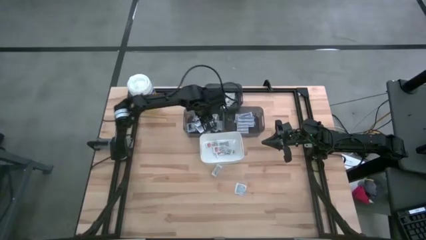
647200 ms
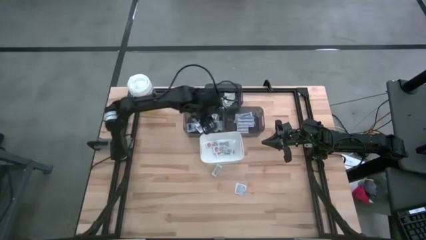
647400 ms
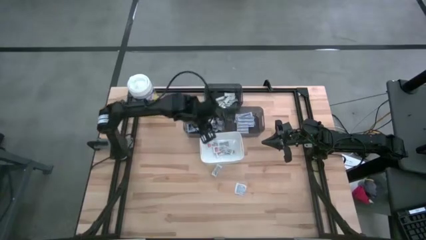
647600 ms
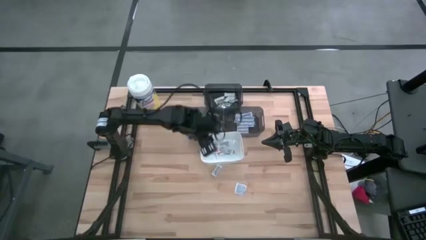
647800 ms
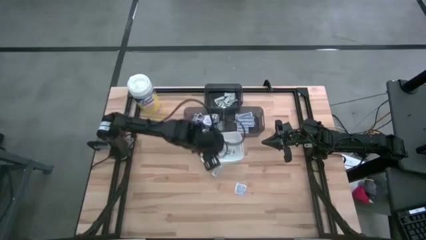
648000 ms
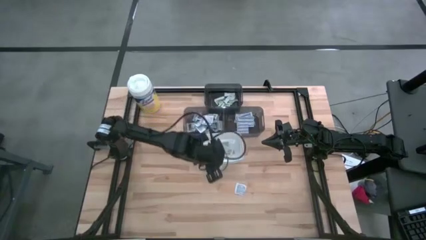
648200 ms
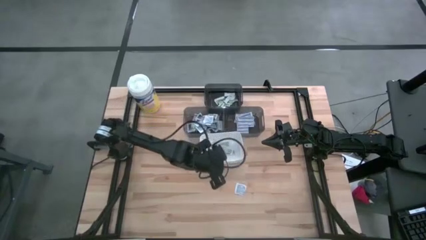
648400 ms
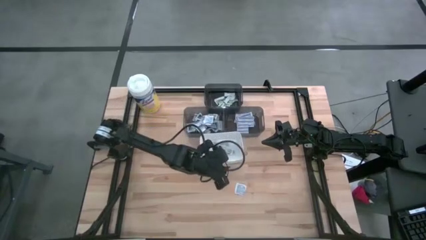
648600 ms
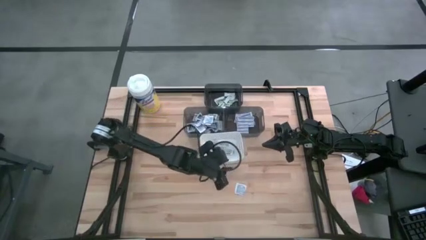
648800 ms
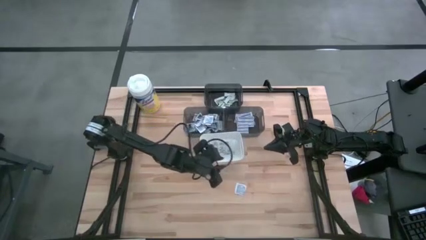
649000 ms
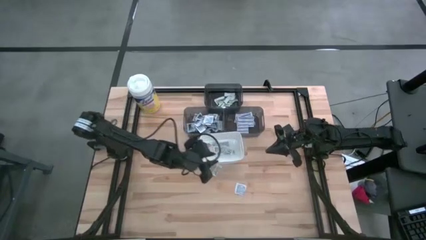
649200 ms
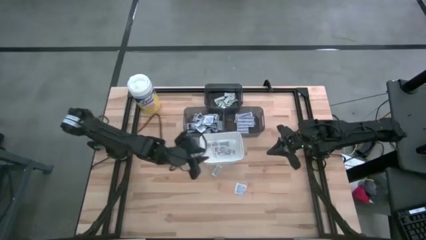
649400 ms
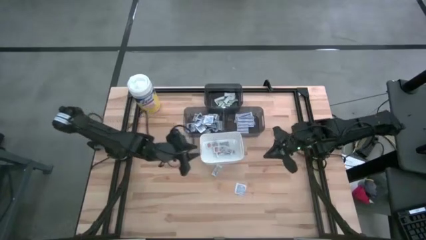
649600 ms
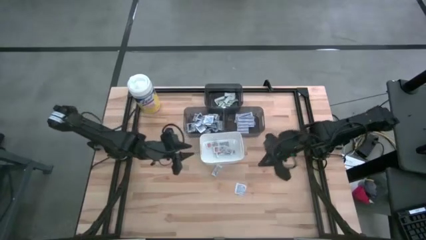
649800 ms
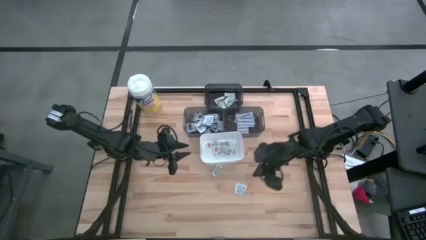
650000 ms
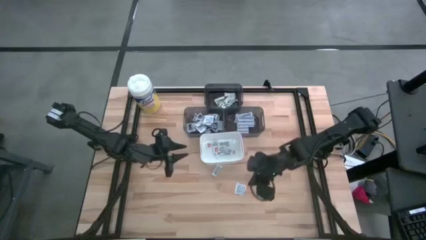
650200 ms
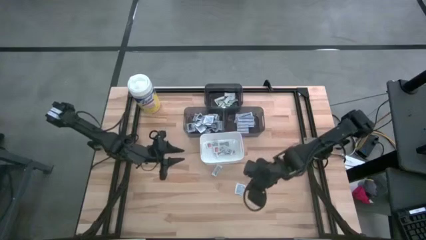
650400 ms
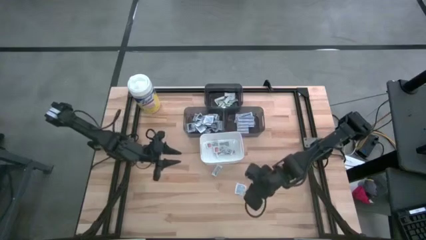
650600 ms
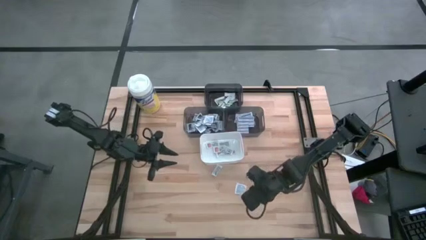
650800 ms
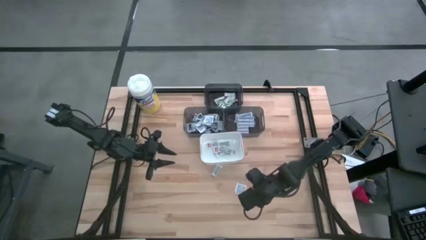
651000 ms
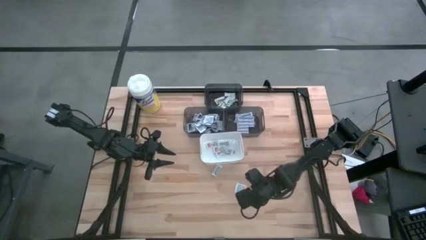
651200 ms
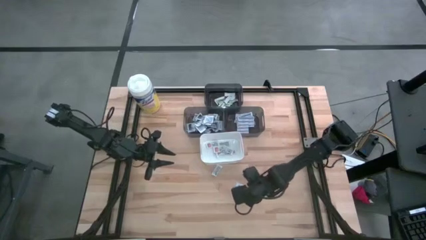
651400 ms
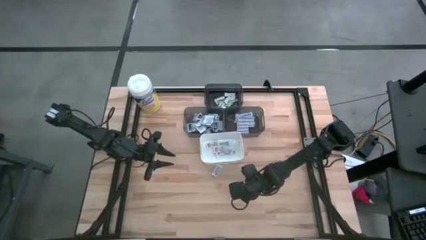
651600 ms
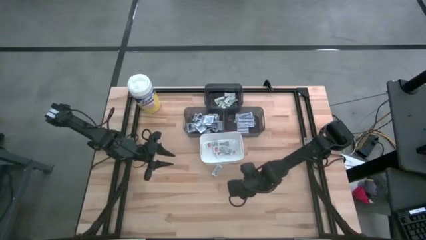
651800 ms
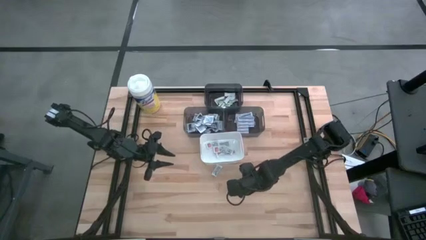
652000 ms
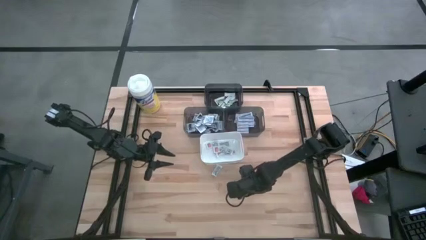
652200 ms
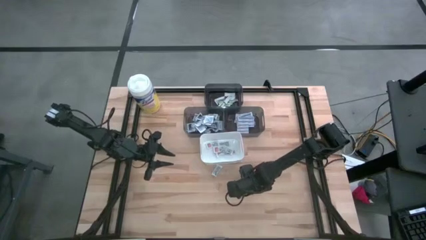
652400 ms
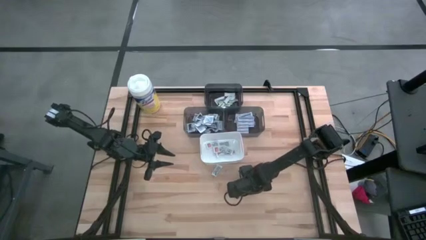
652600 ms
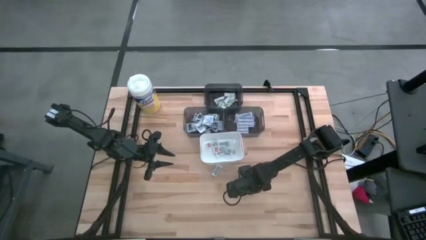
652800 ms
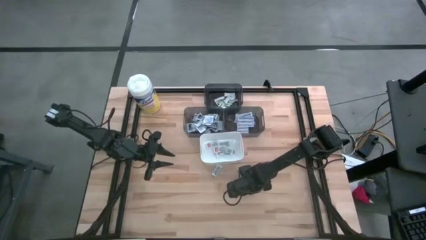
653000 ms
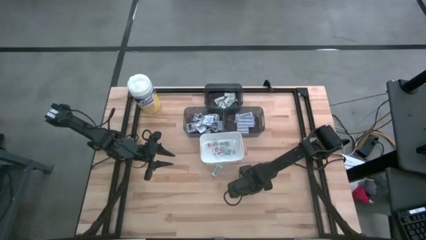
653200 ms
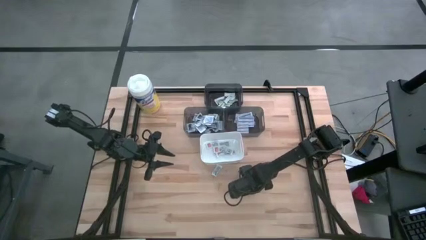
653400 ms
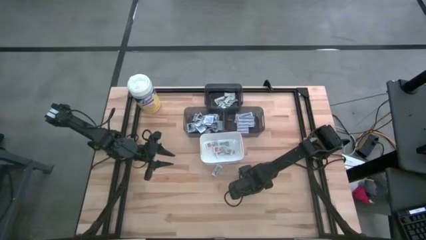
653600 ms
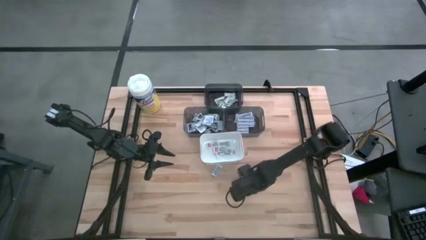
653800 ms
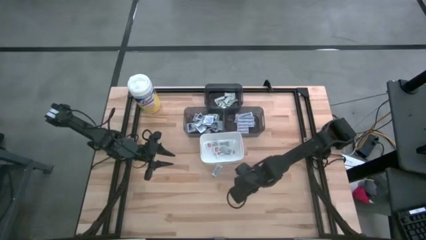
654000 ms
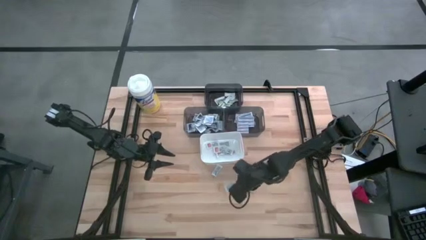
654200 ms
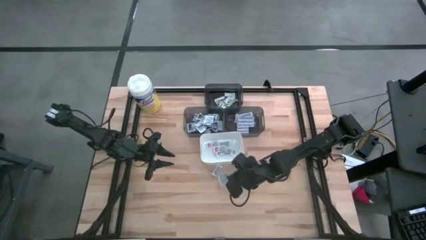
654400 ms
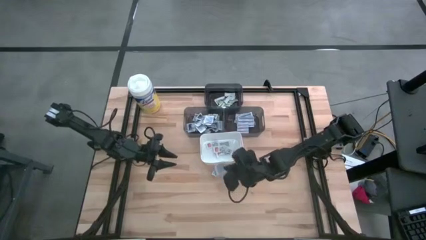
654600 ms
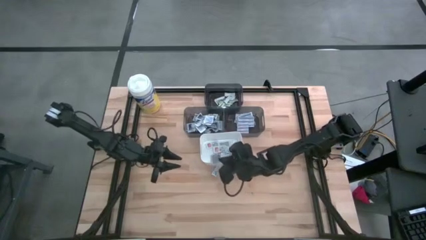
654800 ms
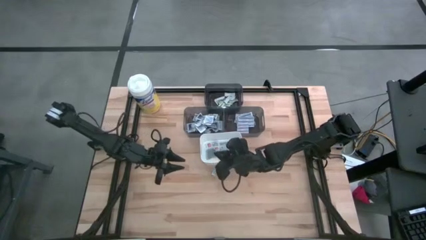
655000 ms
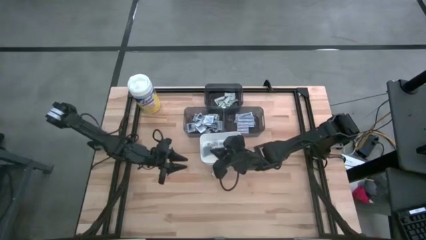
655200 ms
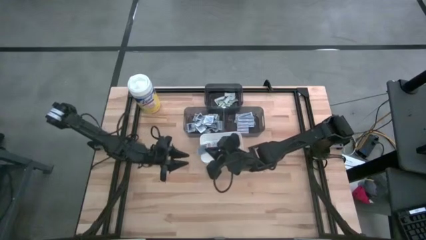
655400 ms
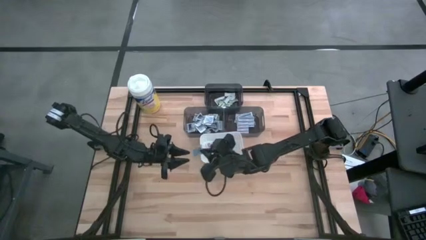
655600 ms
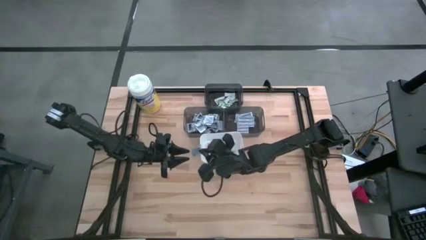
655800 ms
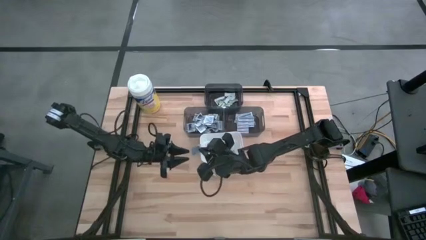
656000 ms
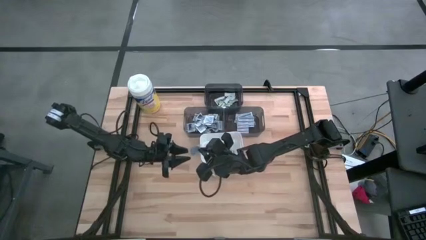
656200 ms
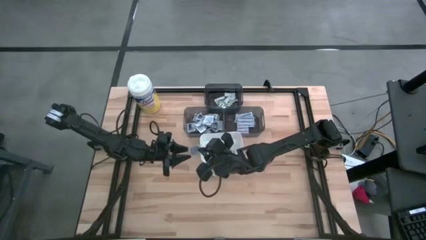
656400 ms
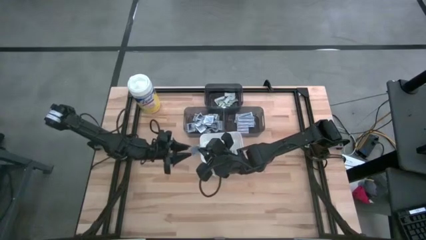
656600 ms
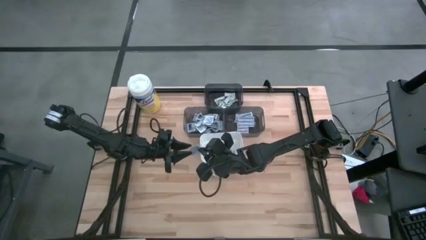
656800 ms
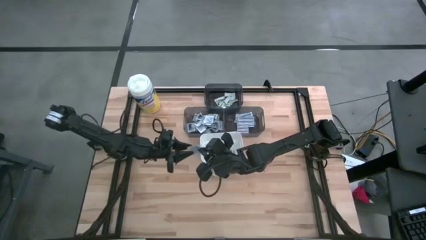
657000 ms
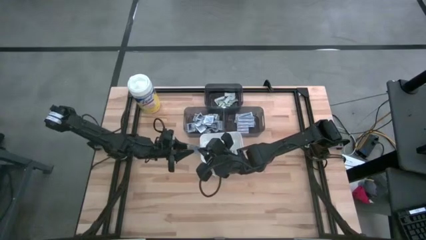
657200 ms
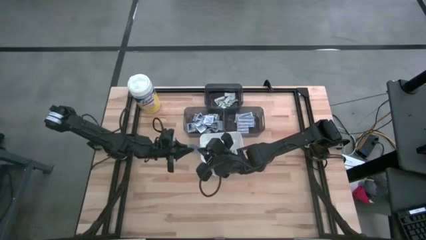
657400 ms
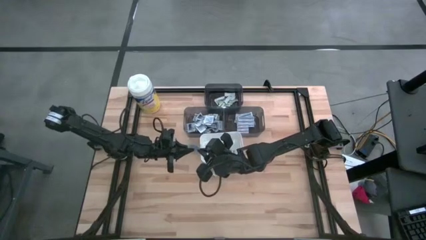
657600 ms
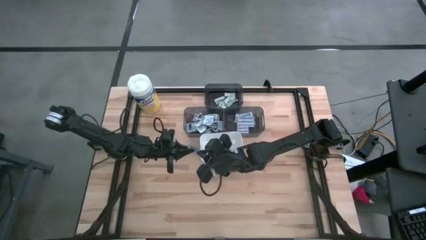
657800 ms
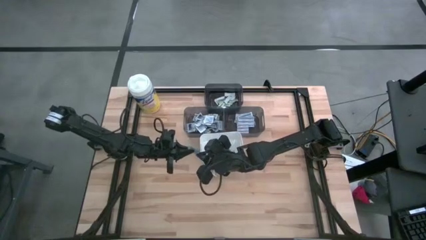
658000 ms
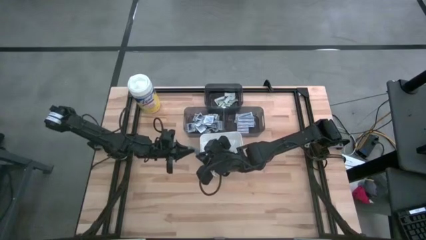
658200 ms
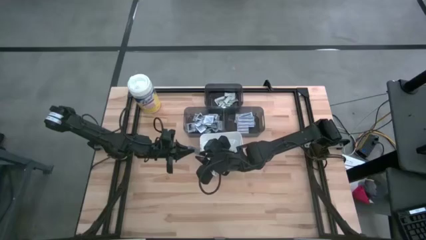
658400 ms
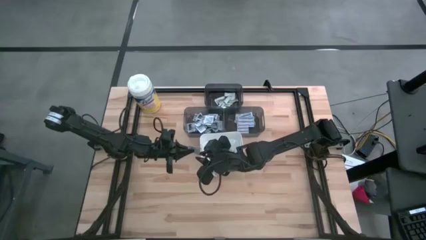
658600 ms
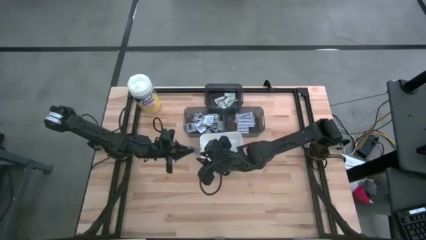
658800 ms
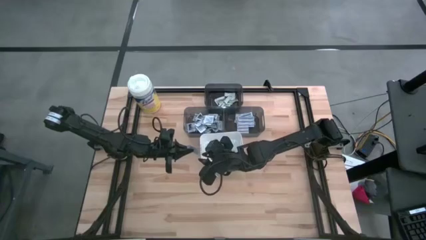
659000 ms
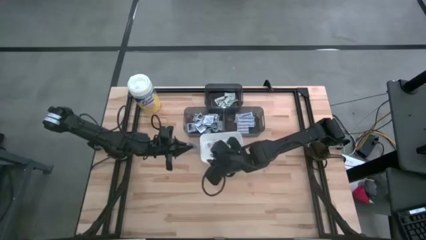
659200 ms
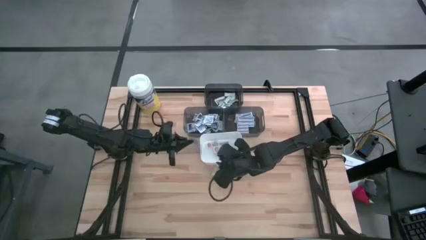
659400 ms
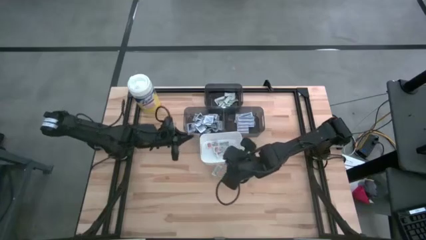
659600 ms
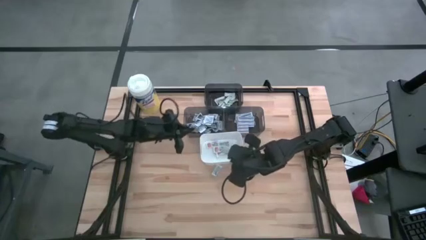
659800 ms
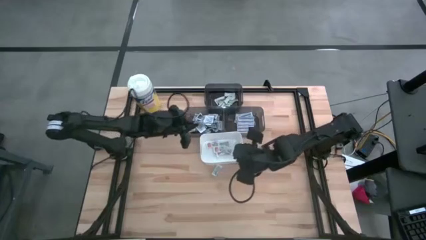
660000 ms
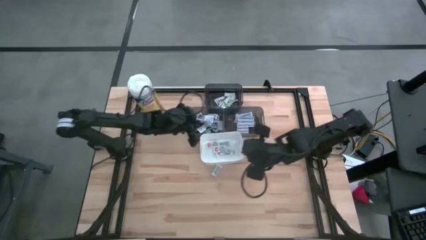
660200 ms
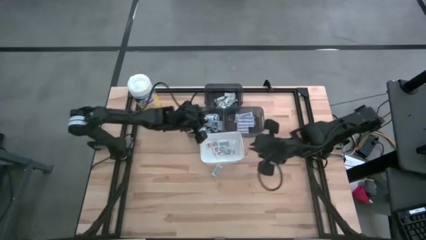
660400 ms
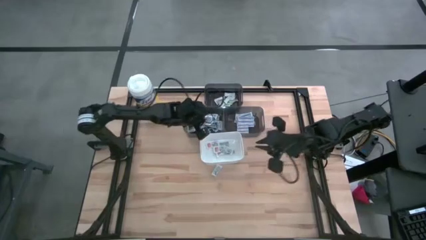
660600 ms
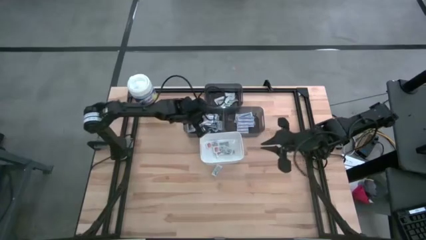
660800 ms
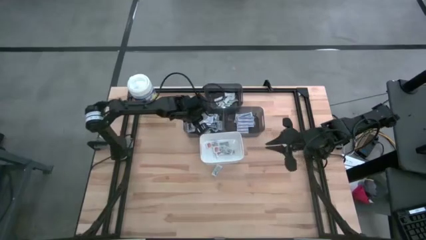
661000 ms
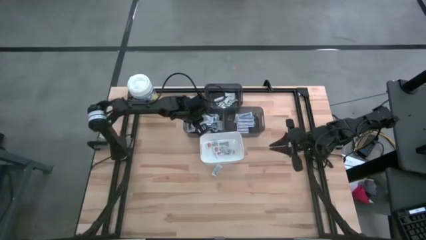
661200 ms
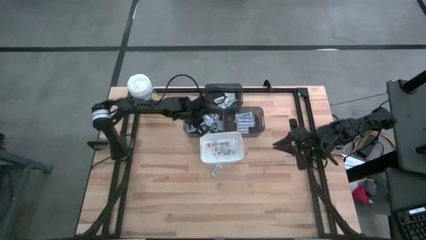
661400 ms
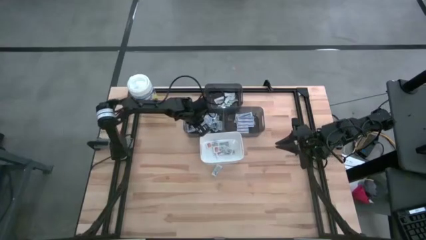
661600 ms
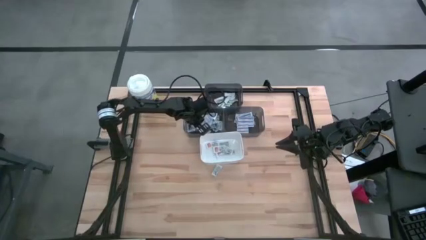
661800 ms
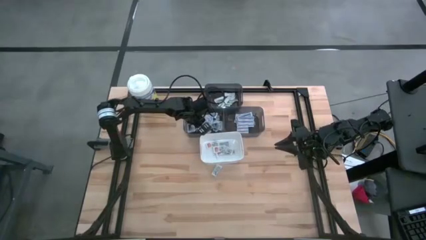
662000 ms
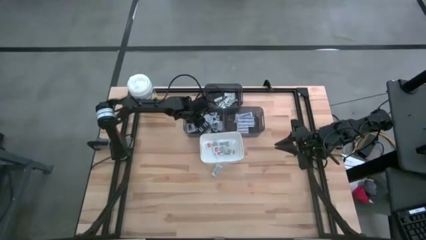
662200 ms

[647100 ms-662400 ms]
Task: Pick & Place First Aid Supplies
Put the alcohol pad into the left black bin

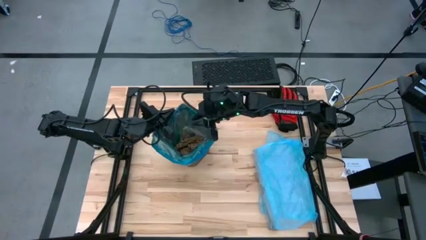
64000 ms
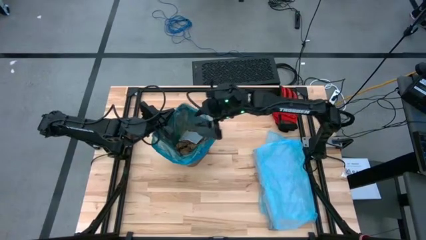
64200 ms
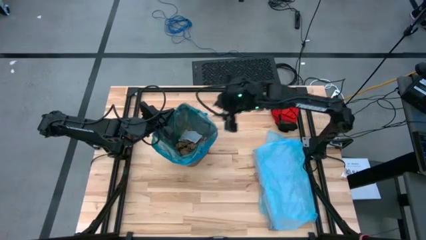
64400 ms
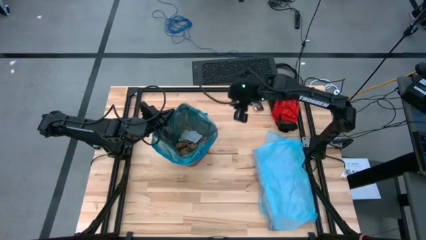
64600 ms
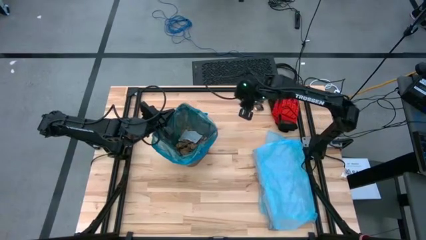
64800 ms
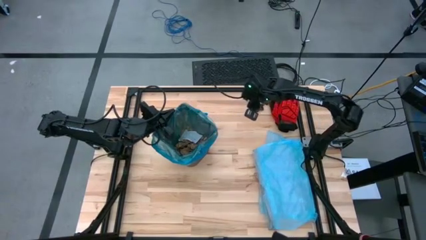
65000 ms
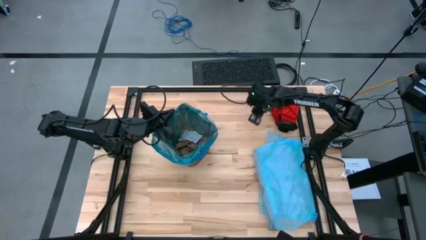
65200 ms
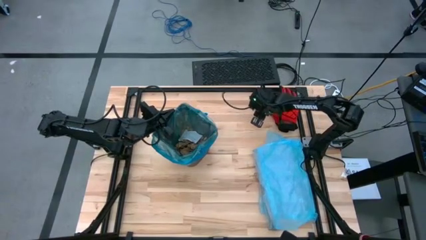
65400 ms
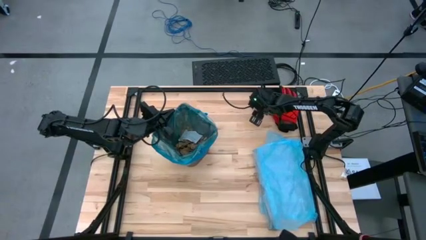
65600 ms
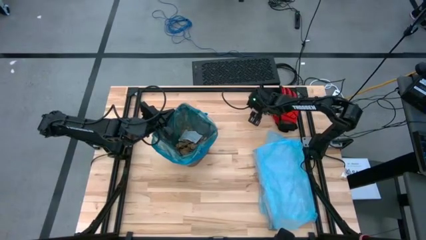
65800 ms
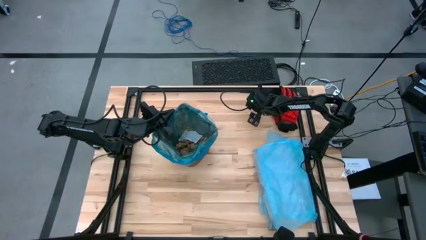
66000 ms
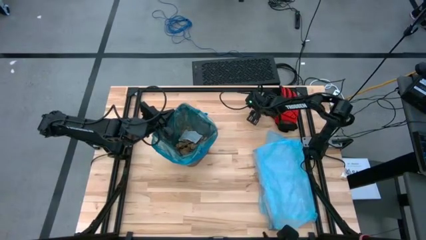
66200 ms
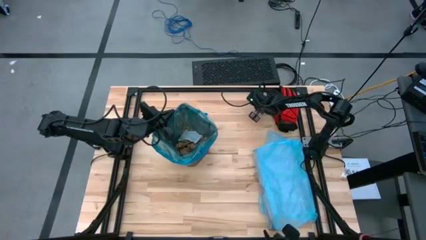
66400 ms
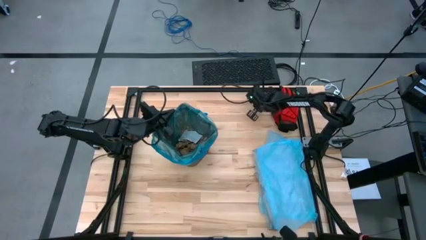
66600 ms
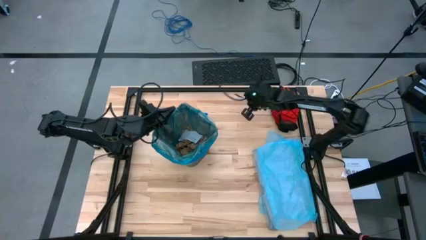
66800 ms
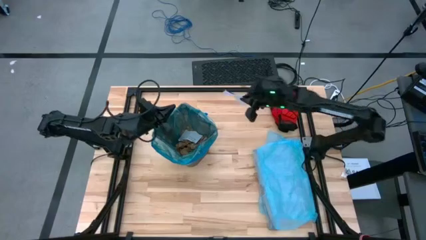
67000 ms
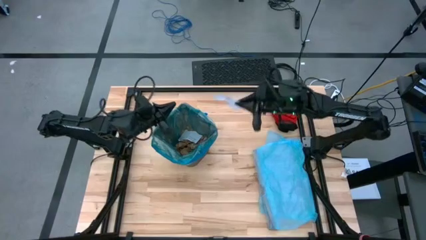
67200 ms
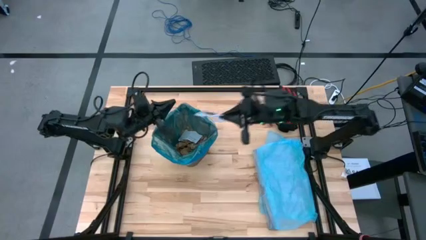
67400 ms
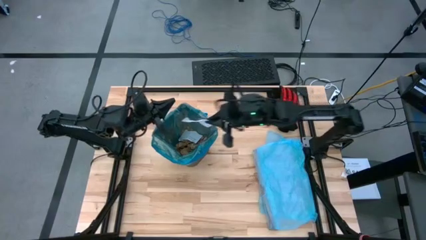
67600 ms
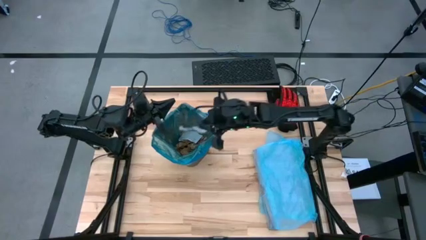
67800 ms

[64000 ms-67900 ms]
Task: place trash/remove bag and relplace
Put the black paper into the trash bin
